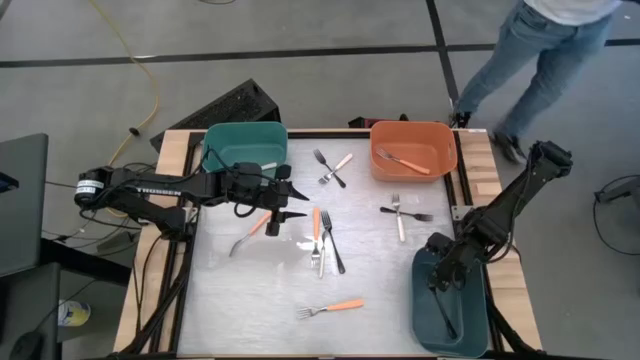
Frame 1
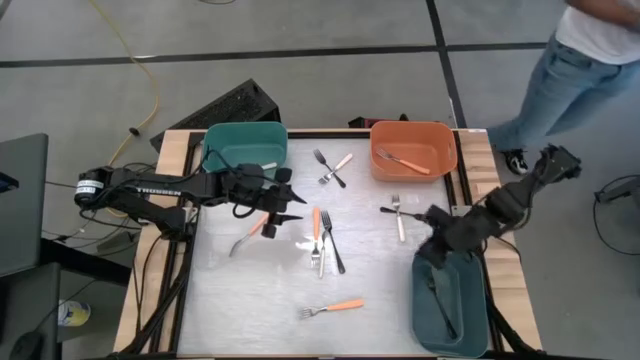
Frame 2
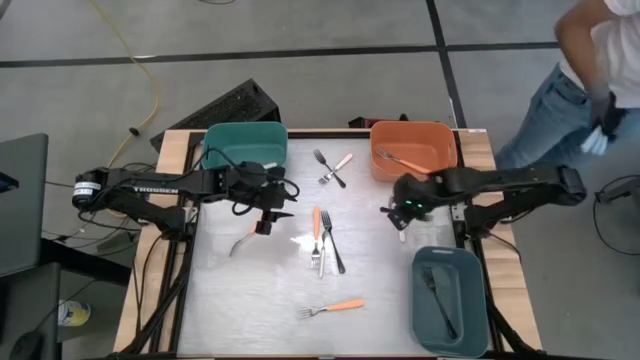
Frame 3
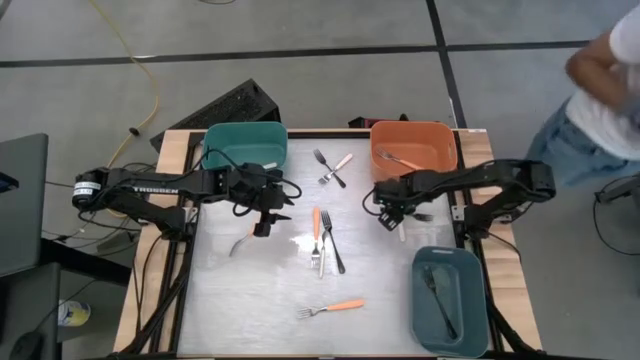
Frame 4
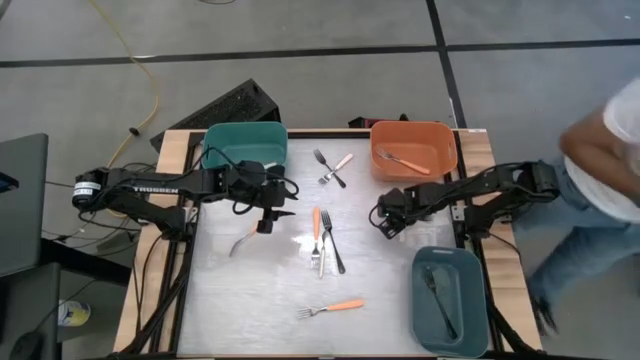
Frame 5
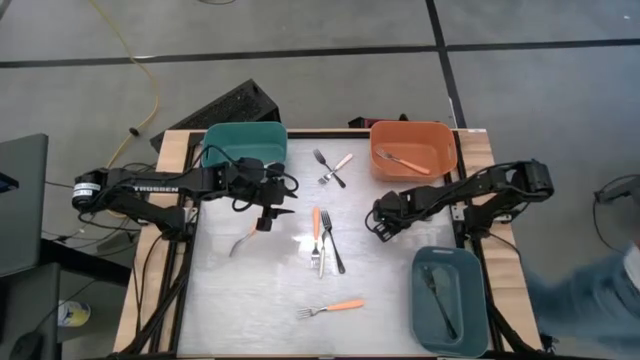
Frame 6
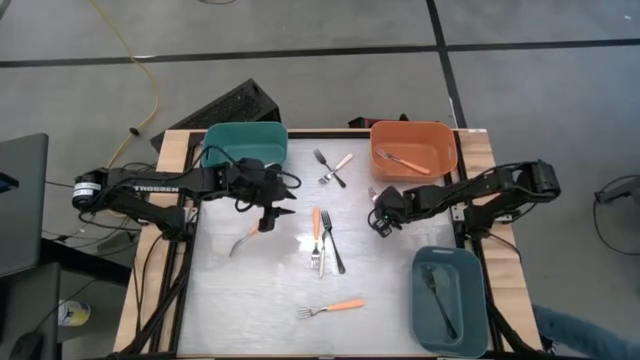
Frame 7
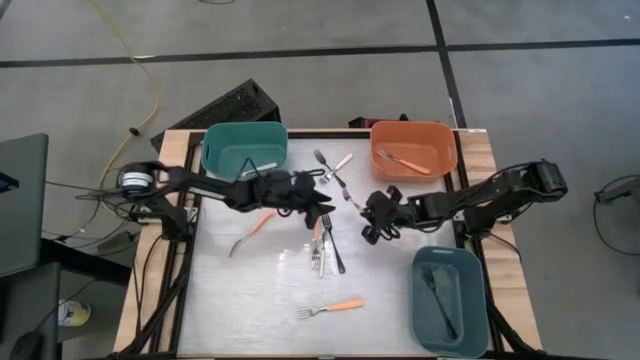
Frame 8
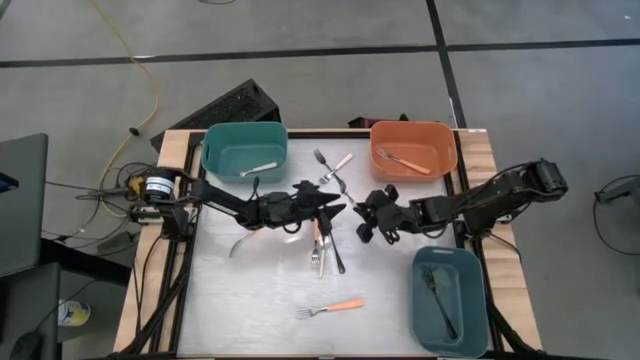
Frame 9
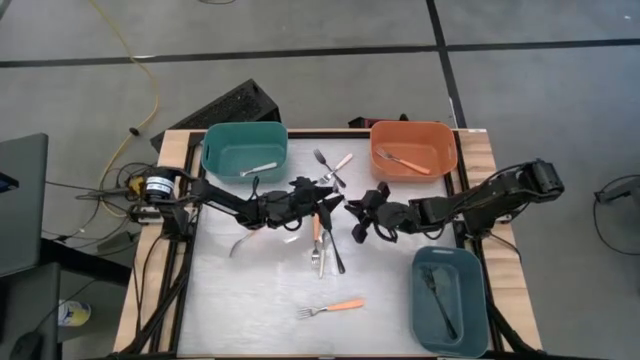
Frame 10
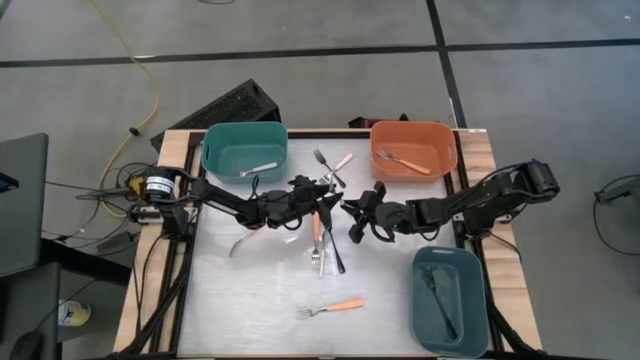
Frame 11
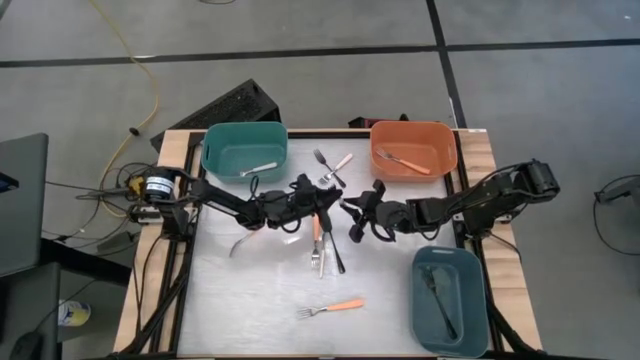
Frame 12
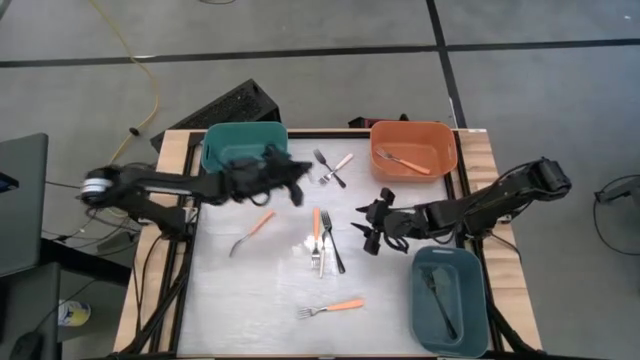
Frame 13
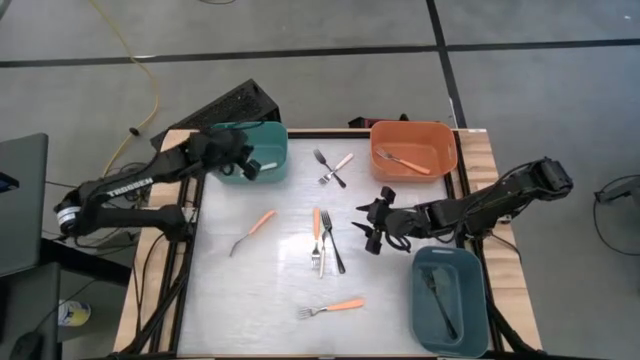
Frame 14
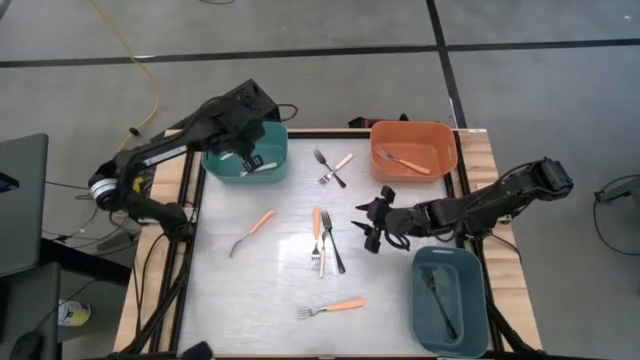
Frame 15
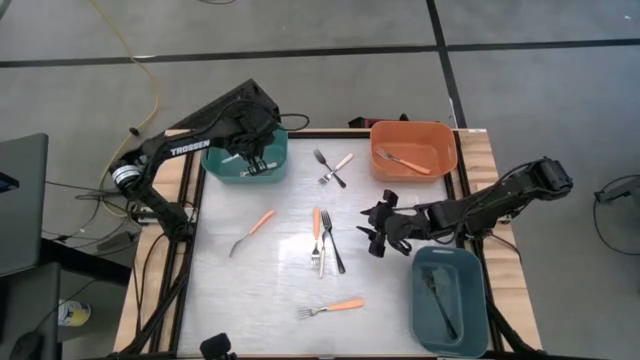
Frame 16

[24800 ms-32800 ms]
Task: Sort silverware by color (type)
Put the middle right white fork into the green bin

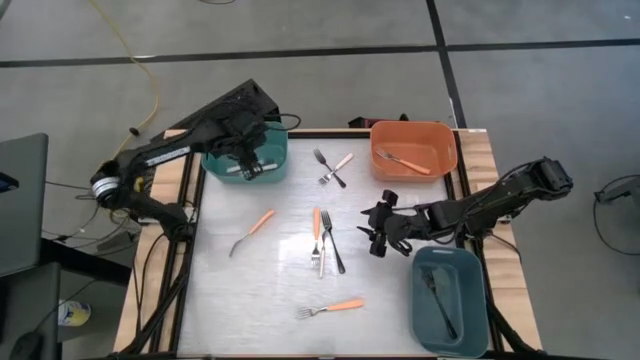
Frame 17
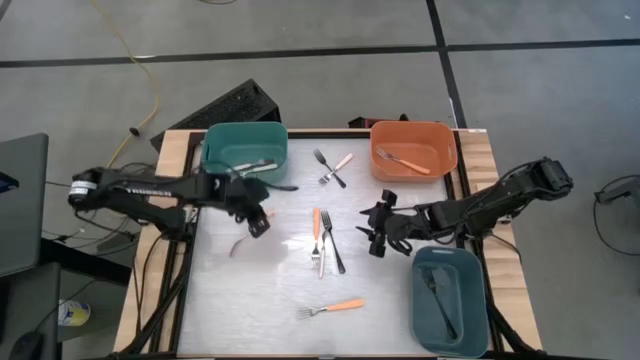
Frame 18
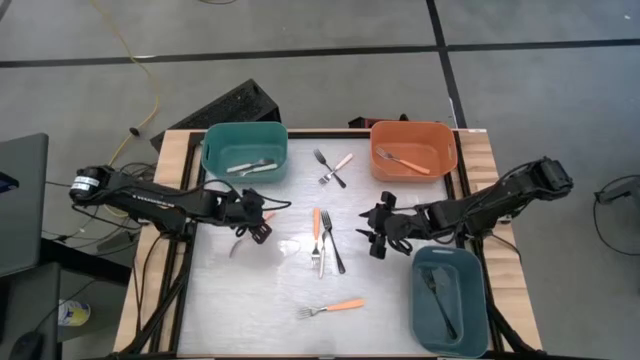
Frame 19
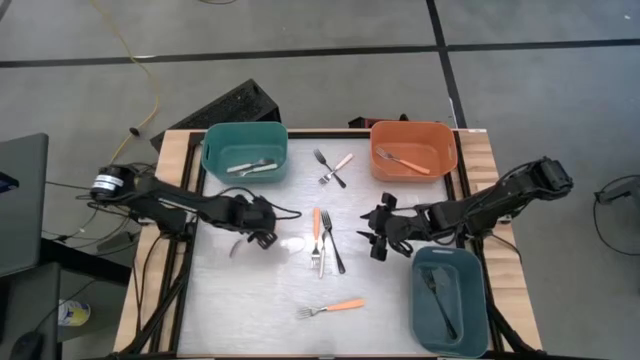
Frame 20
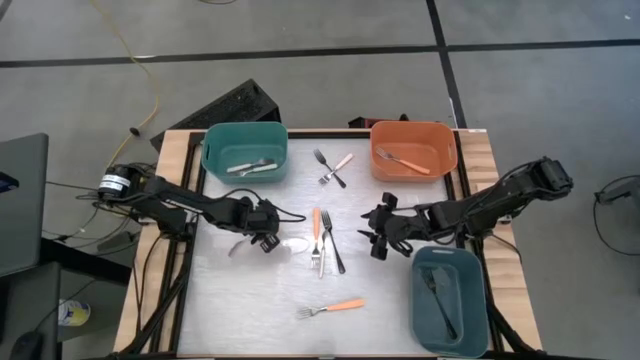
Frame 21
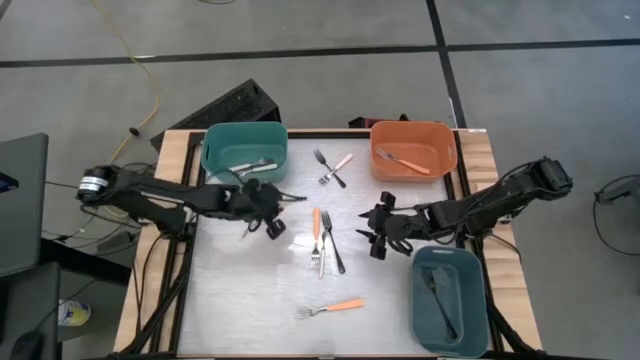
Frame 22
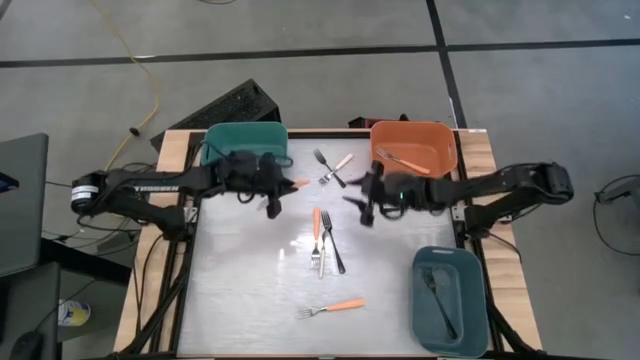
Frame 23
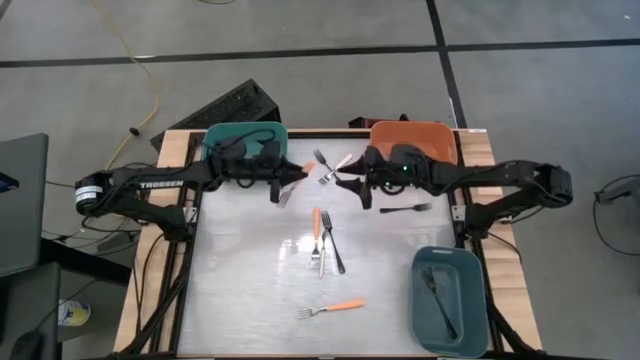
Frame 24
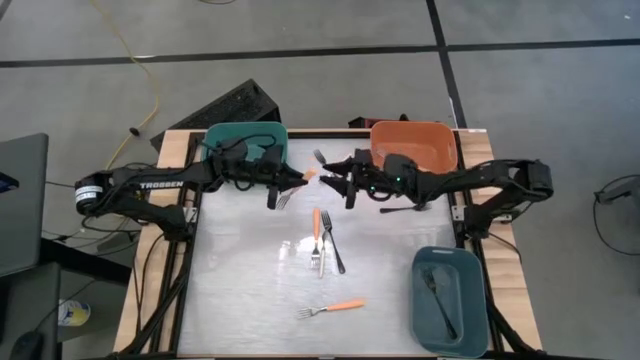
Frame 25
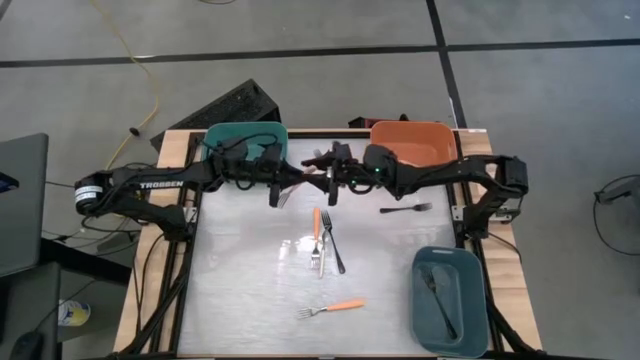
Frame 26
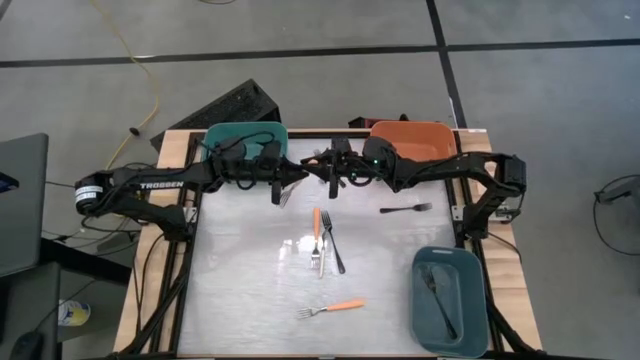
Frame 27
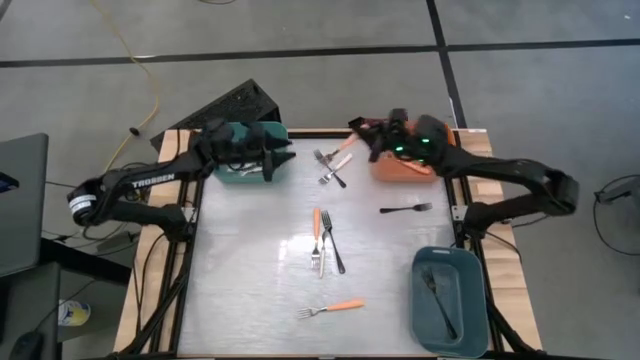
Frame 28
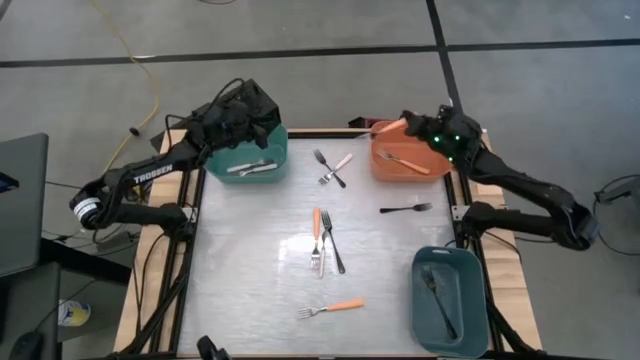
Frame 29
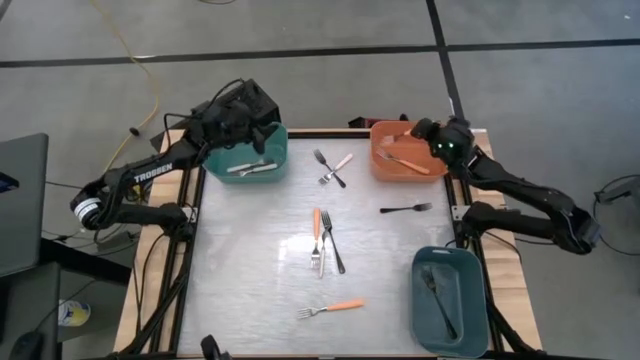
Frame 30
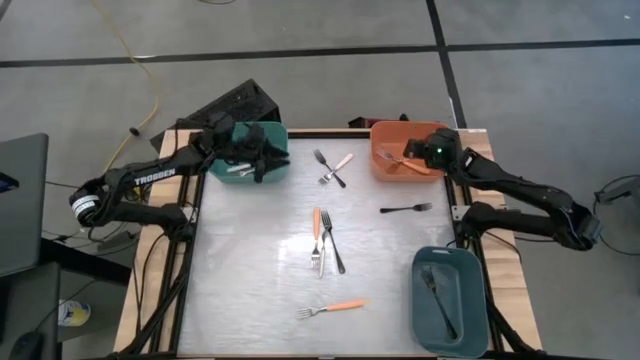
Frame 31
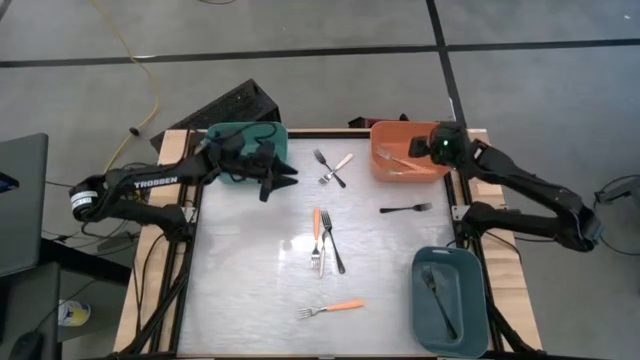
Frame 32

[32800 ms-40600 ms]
Put the top left orange fork into the orange bin

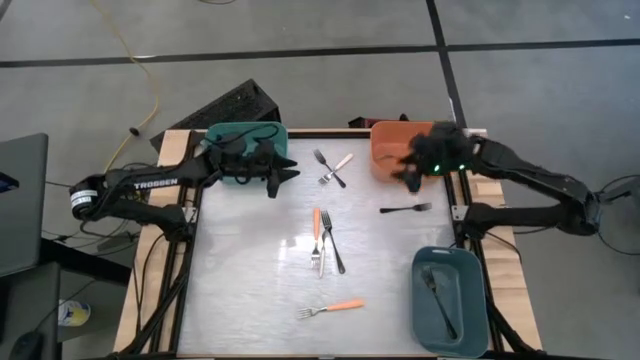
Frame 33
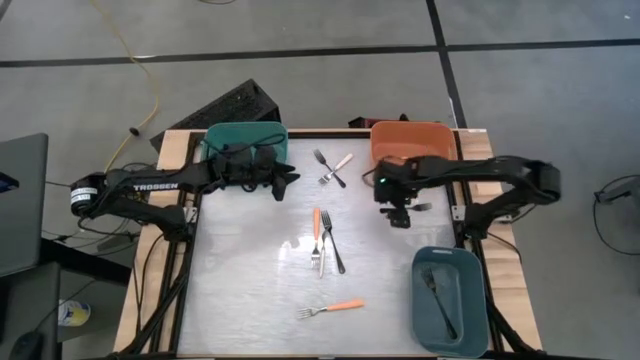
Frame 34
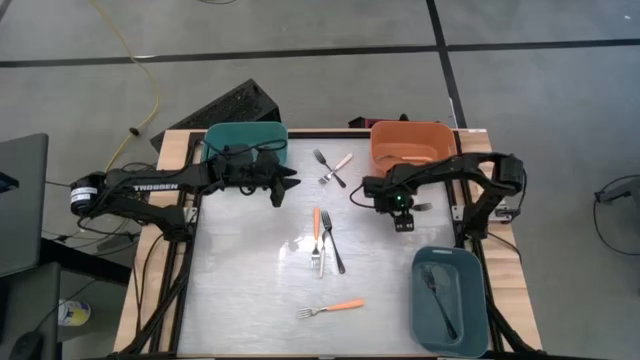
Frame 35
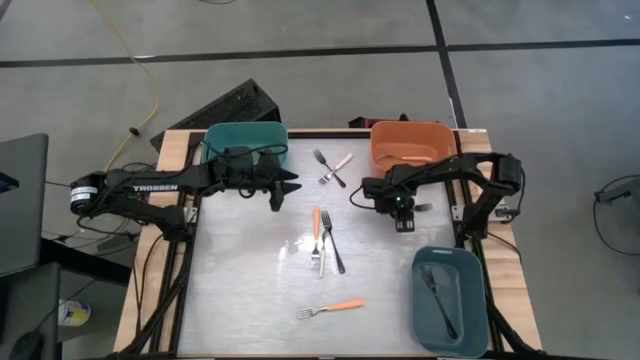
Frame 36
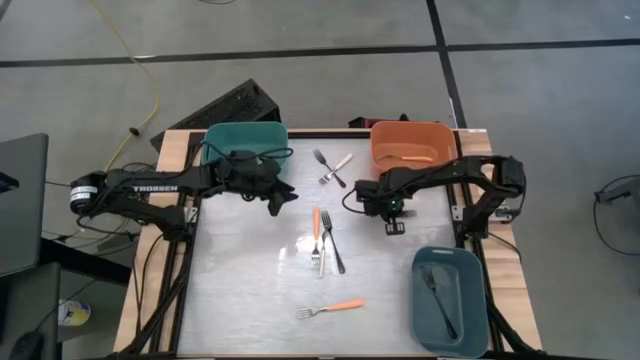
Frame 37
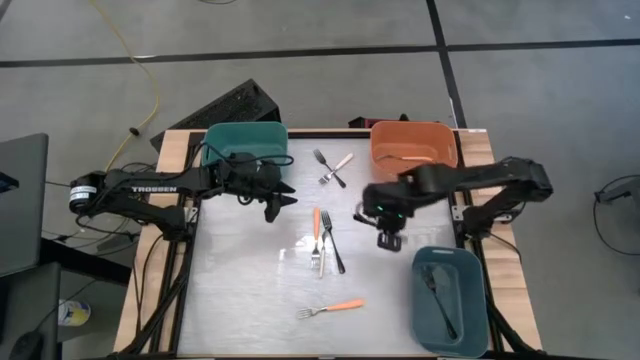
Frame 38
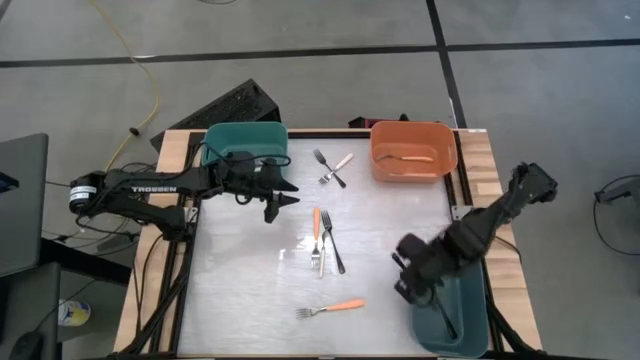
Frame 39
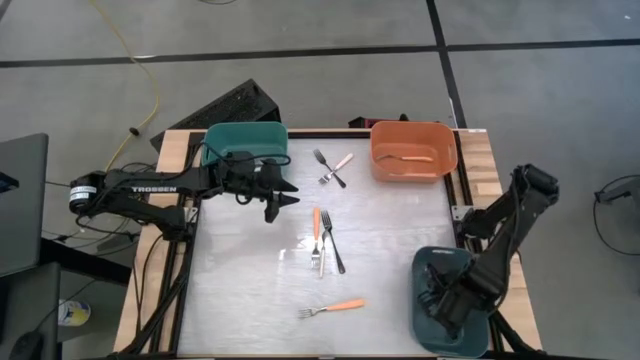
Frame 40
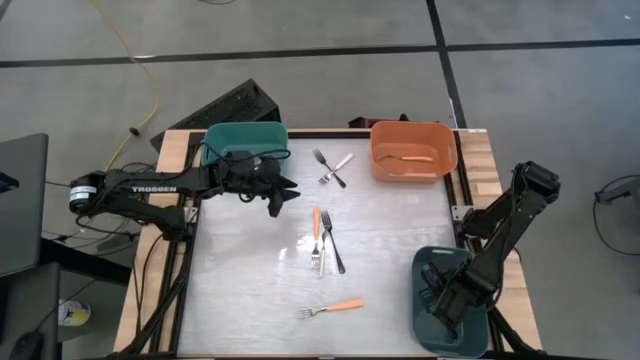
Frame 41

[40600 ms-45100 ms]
Put the middle right black fork into the gray bin
